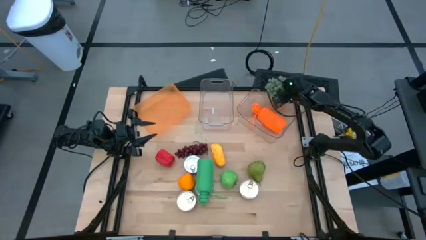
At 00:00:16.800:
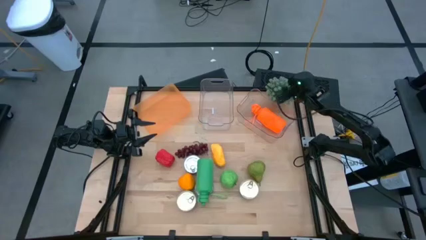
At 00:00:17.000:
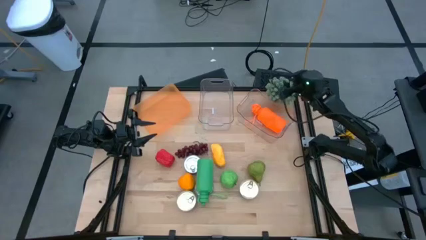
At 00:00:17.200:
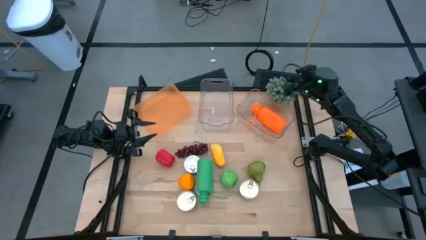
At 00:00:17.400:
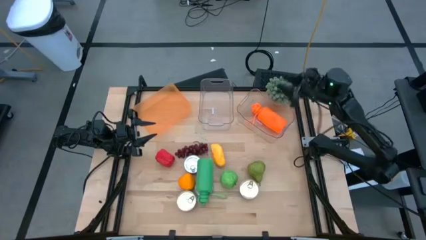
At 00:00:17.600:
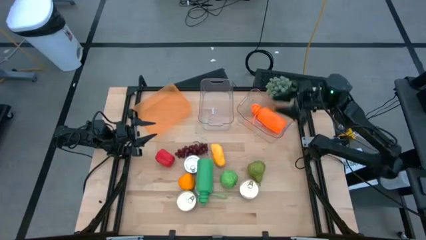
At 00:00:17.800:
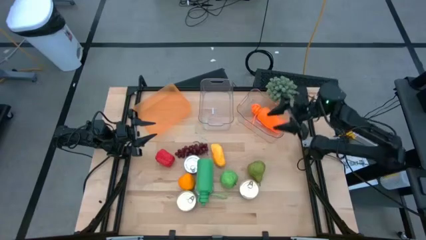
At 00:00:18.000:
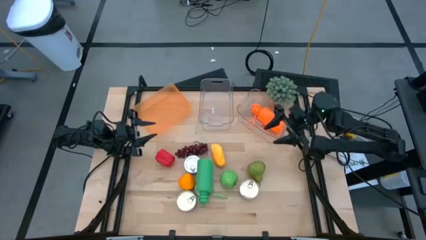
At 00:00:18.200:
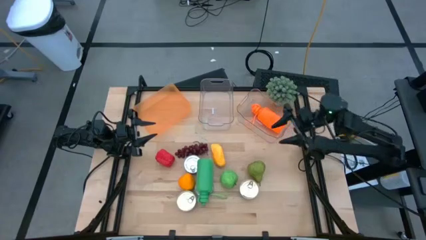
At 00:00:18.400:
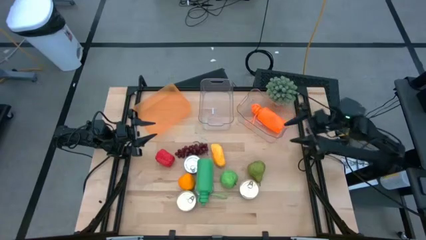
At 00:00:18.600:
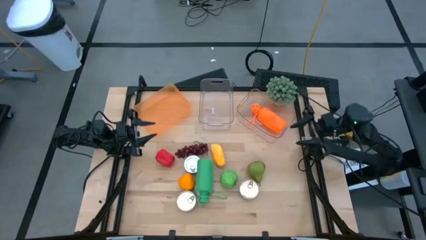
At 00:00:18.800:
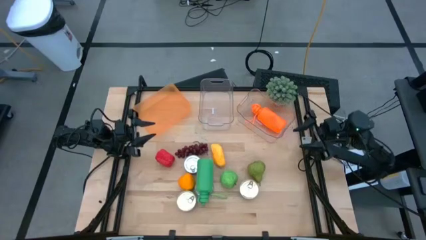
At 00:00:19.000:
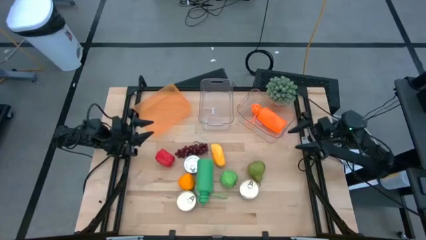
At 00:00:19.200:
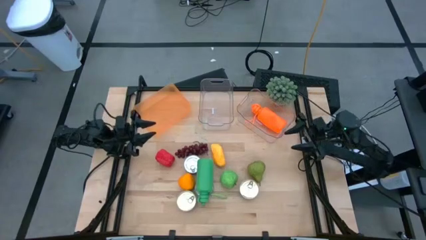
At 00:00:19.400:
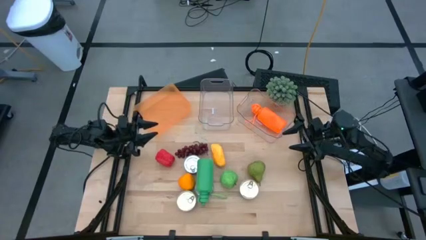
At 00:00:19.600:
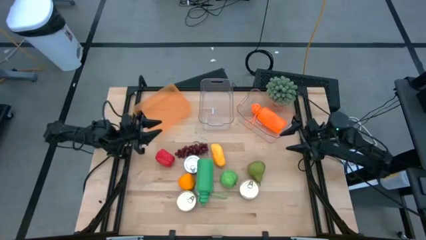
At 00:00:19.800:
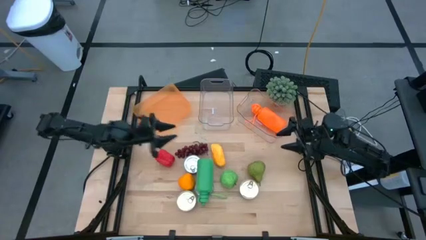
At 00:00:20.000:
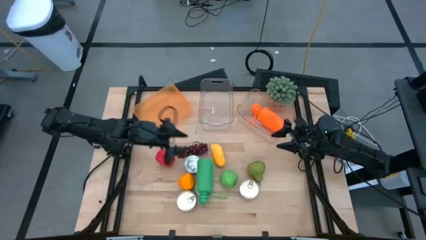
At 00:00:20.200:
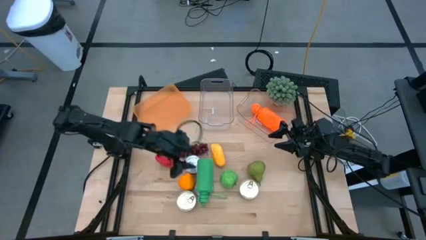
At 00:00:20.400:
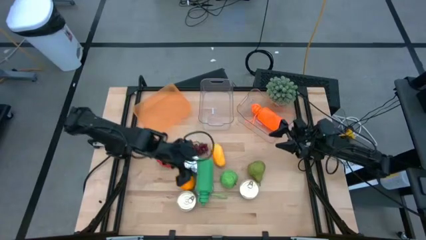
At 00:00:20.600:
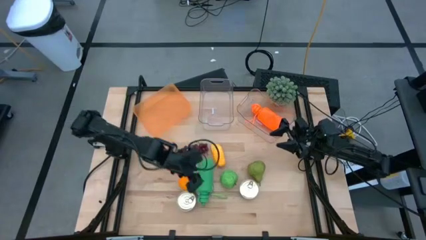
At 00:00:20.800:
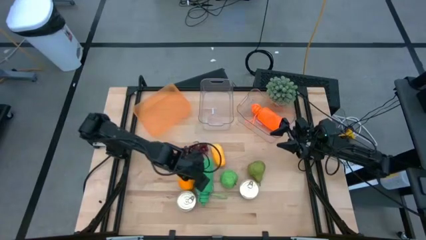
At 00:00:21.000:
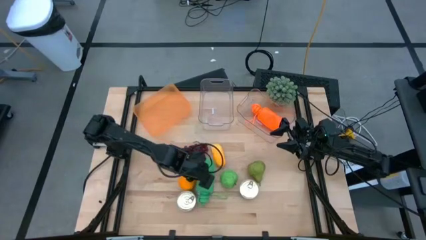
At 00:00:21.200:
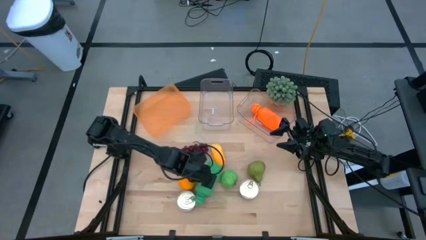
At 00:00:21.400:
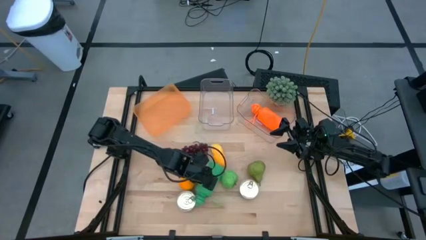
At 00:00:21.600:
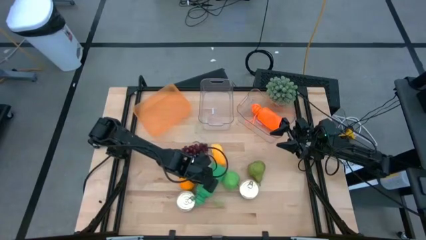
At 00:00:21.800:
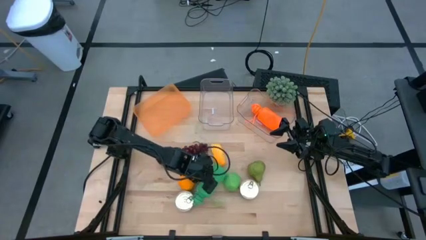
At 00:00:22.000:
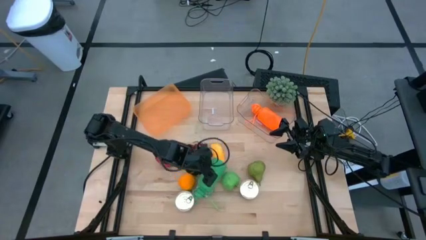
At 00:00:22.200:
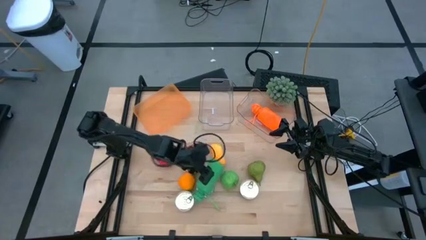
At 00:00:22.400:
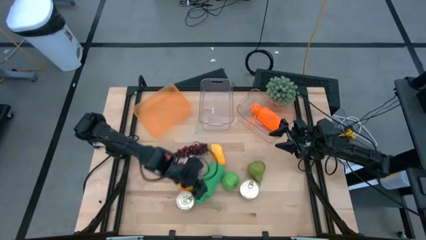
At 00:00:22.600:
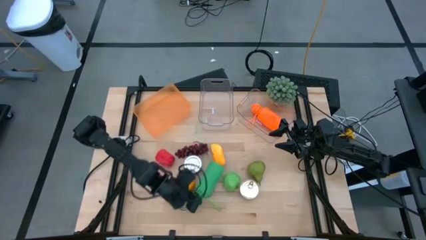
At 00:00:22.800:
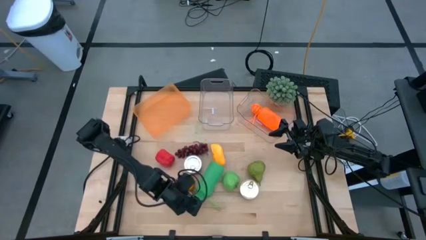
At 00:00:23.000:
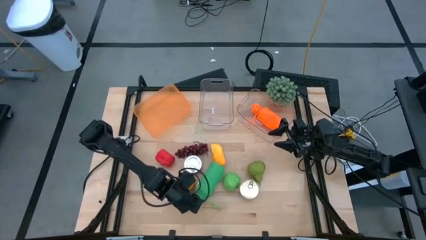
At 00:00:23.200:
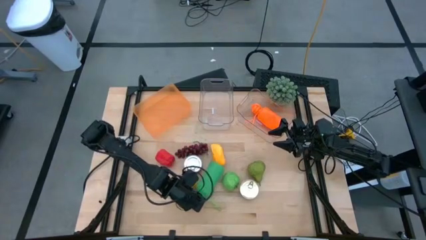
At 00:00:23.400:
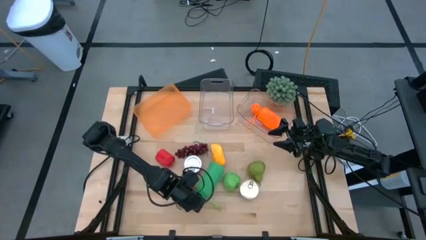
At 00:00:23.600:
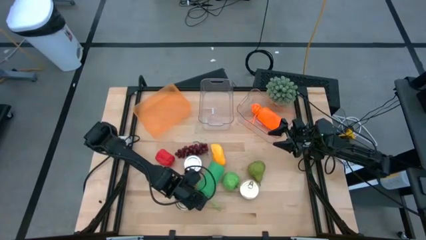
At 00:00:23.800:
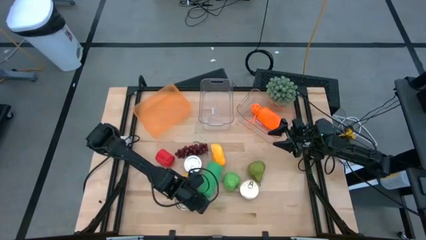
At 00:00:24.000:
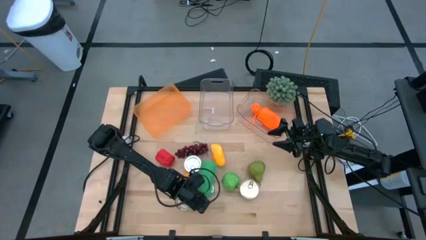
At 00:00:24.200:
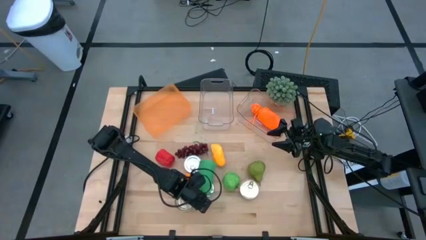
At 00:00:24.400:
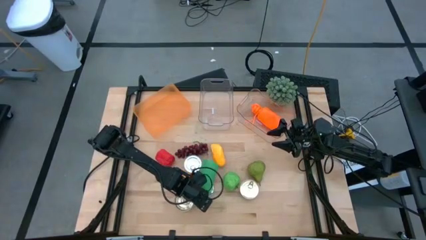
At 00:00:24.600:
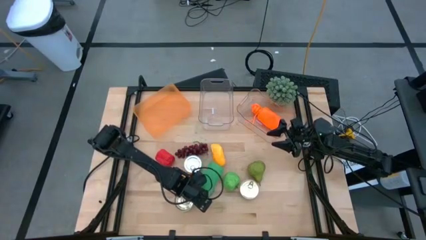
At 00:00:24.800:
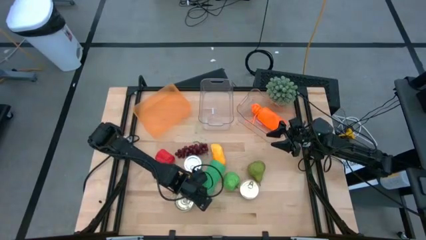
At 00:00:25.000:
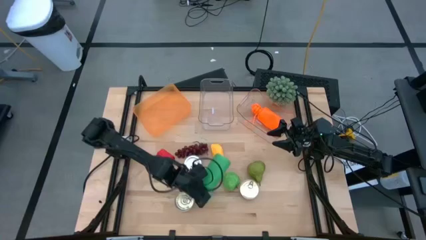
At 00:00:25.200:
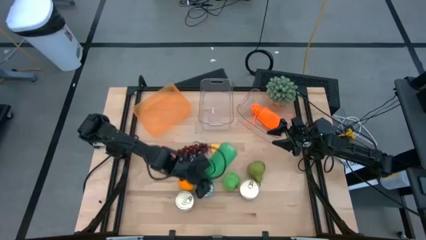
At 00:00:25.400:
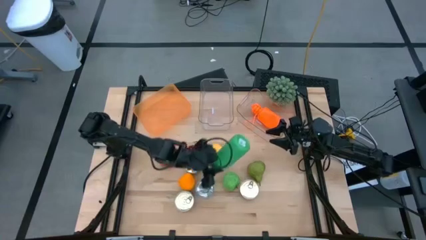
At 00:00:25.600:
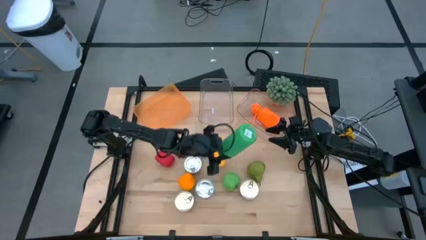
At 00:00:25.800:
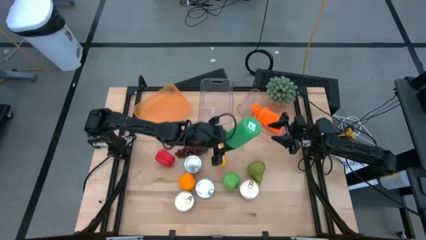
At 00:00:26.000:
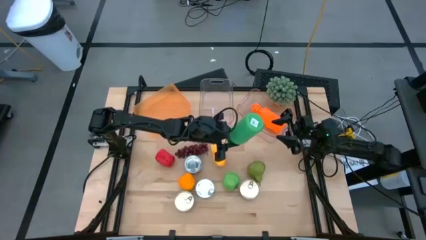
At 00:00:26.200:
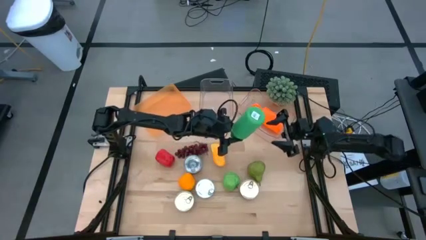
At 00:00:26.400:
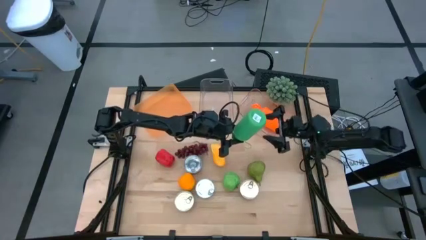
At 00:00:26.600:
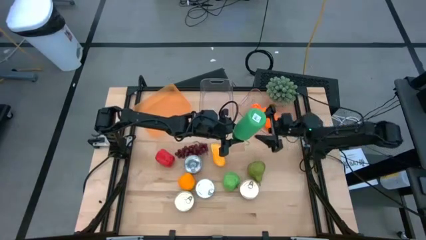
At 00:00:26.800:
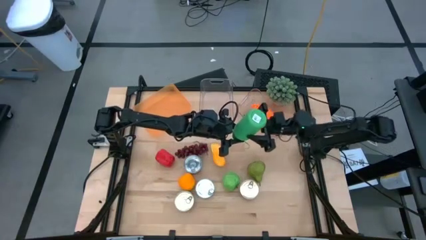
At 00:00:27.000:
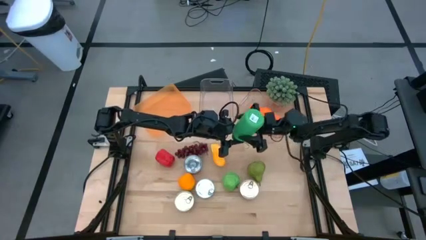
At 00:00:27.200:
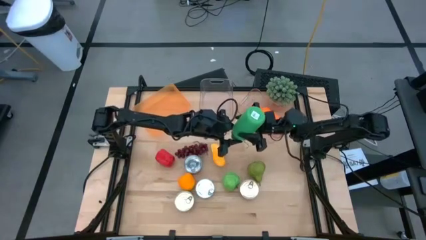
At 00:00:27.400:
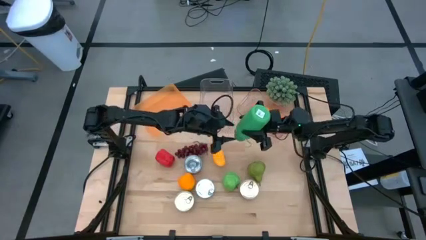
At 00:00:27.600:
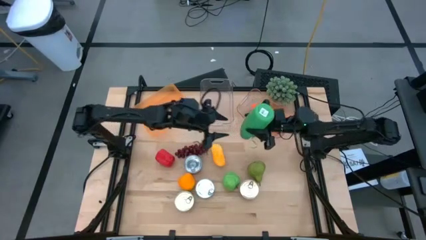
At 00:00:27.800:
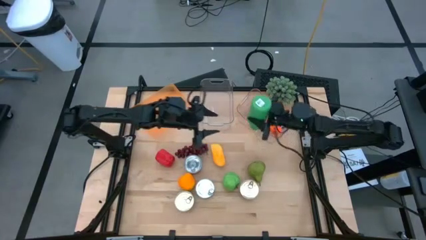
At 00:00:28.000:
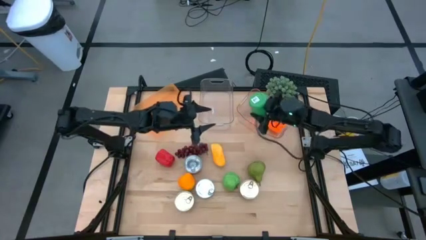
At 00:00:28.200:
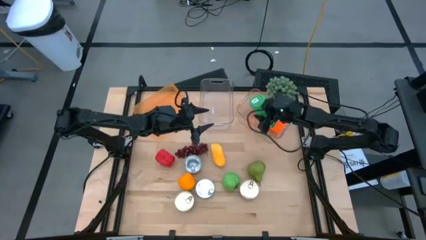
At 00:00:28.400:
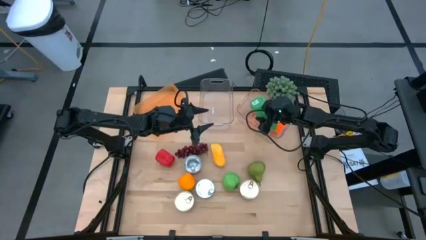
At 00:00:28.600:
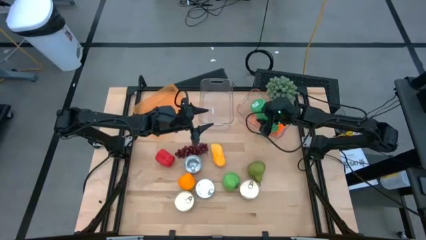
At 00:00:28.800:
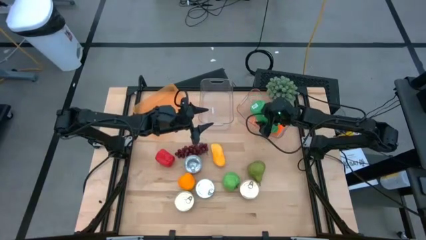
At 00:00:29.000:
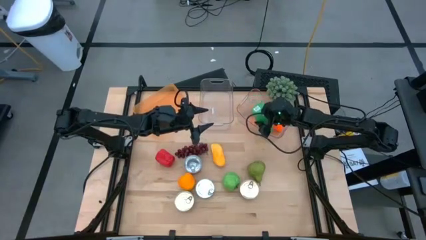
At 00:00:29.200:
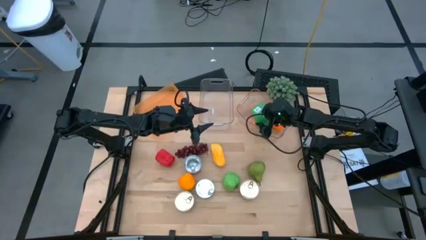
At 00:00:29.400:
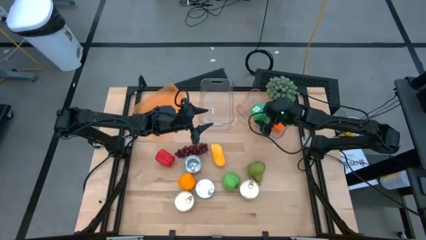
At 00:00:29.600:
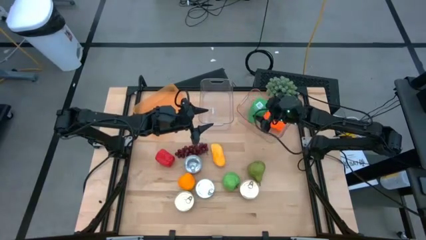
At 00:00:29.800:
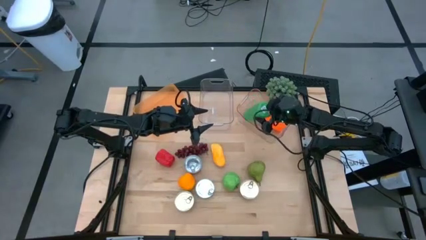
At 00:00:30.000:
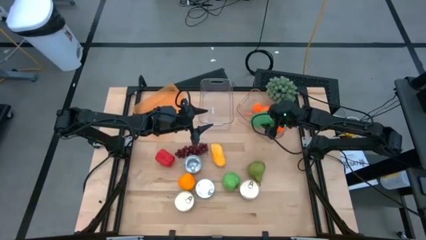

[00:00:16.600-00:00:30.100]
Task: Pick & Place Food Item
Put the green tumbler into the right transparent bin
